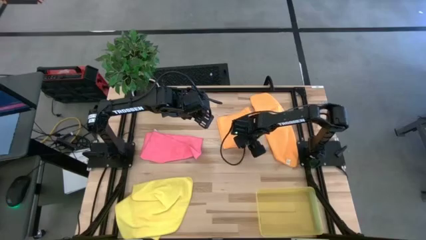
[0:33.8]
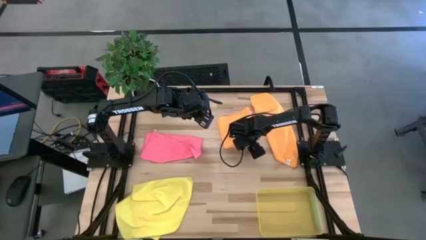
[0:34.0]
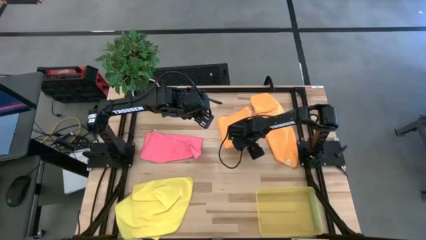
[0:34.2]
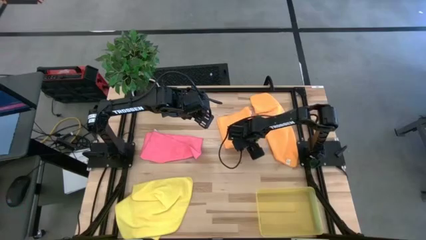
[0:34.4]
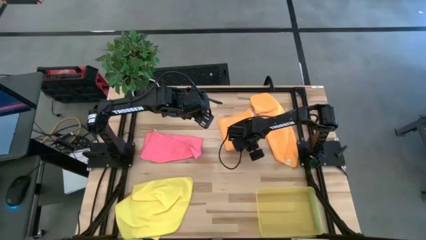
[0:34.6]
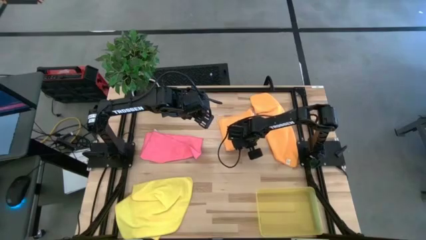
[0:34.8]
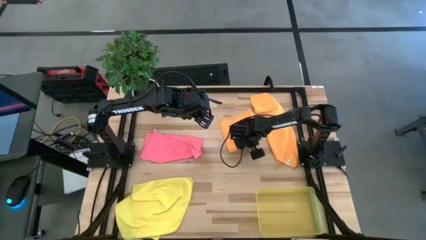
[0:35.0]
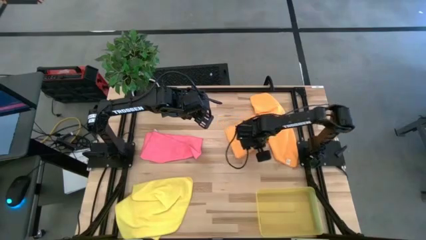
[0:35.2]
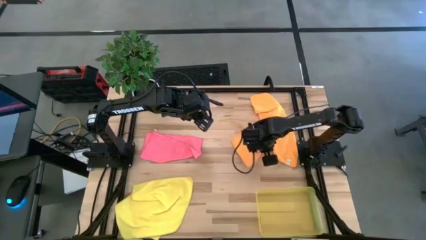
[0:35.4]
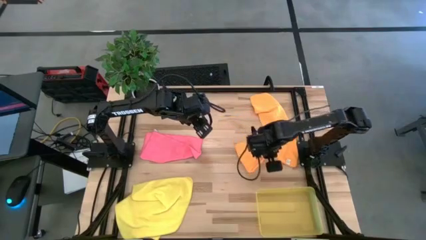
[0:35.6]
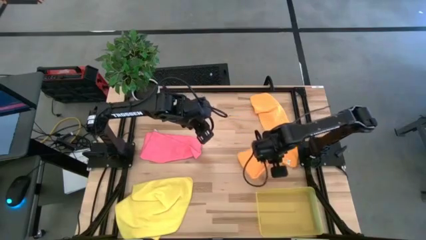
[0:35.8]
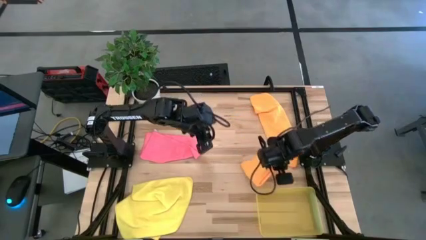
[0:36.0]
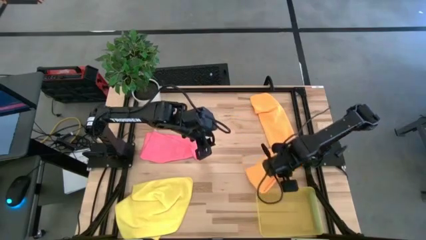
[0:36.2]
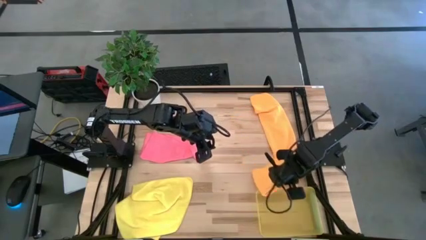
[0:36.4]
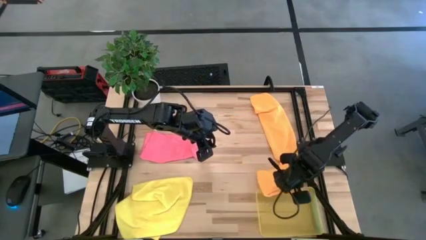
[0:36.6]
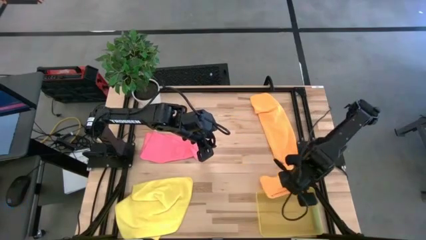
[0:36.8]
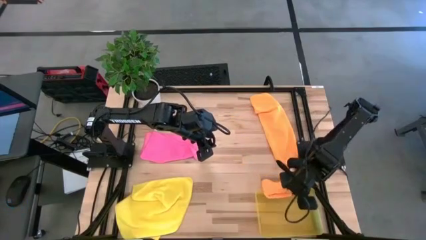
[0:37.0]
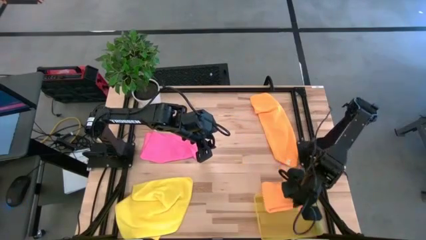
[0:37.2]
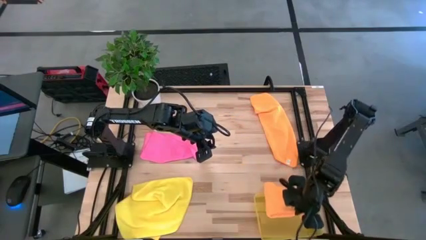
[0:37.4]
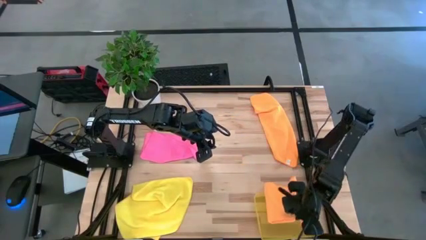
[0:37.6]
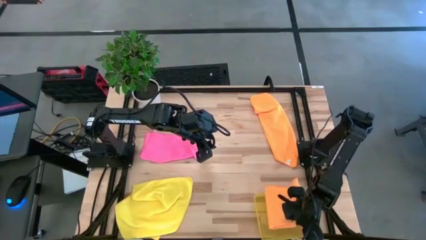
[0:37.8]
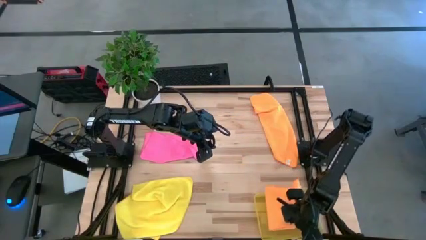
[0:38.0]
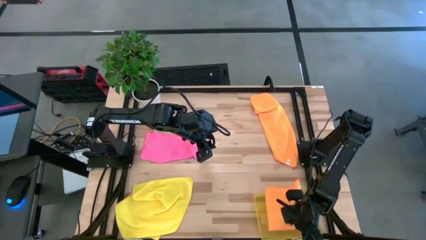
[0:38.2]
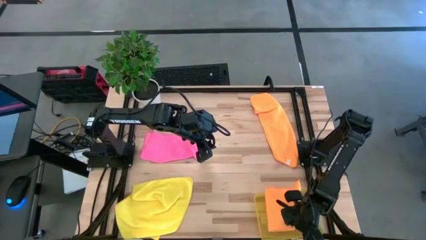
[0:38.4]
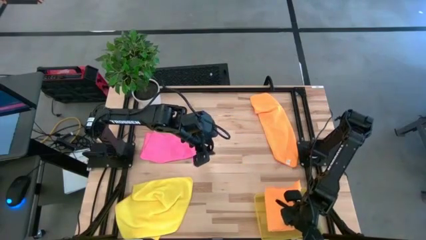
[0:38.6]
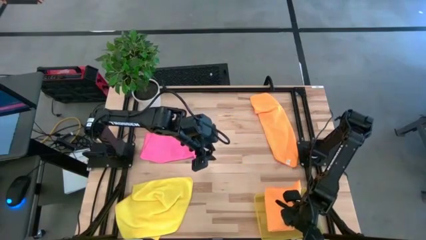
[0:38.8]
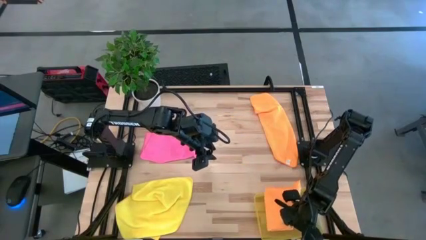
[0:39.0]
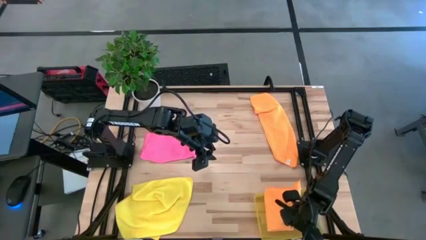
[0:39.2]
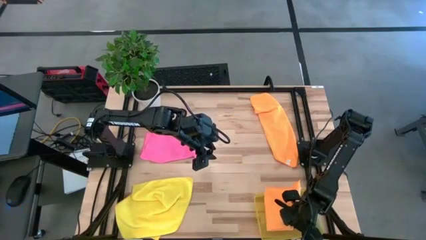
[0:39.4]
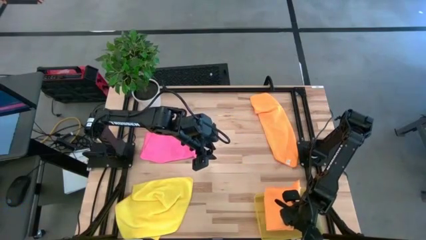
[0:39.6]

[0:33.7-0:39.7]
Task: Fold microfiber towels
Put the left orange microfiber cloth into the bin

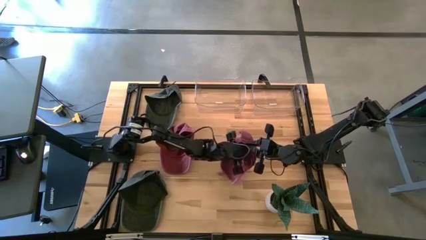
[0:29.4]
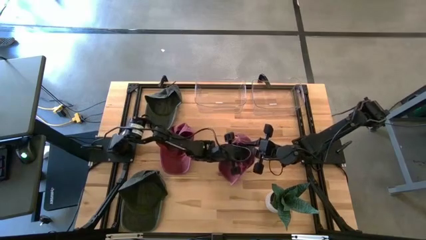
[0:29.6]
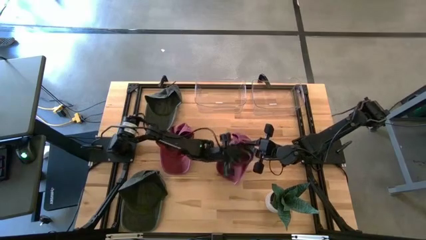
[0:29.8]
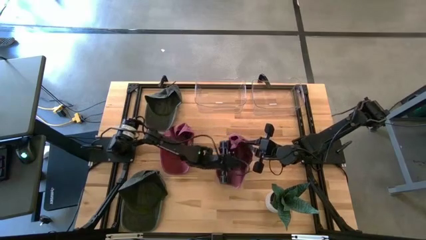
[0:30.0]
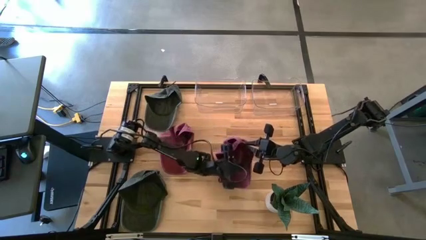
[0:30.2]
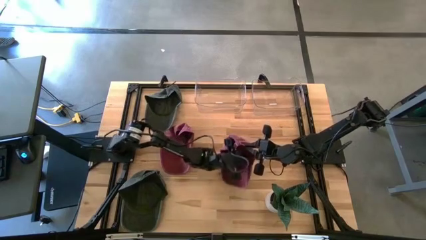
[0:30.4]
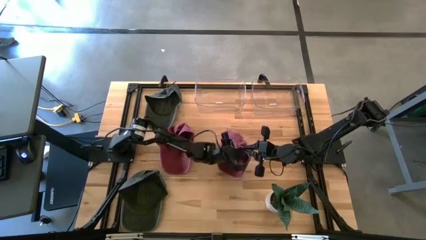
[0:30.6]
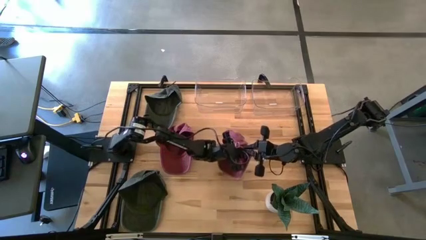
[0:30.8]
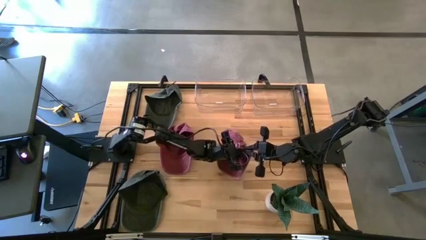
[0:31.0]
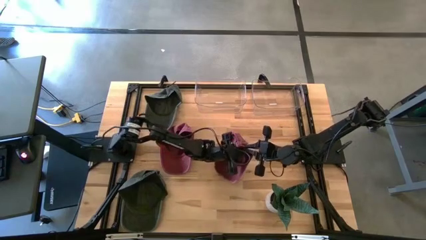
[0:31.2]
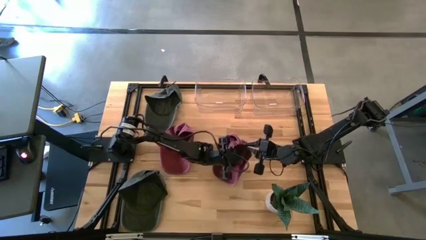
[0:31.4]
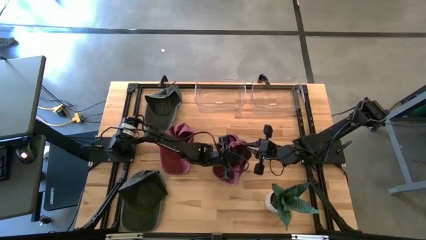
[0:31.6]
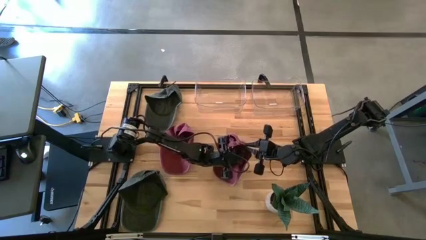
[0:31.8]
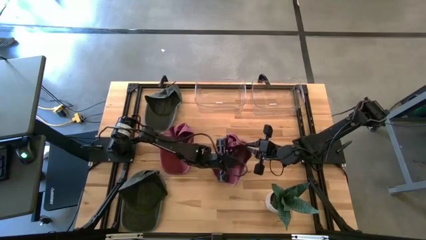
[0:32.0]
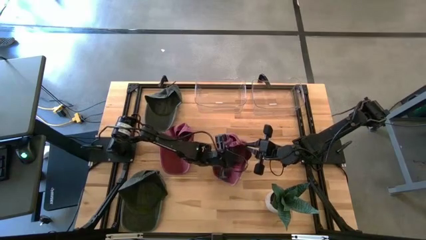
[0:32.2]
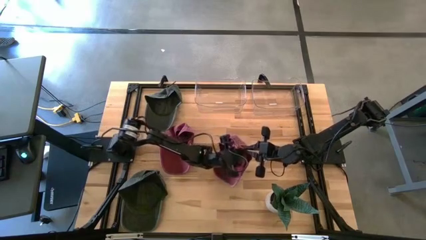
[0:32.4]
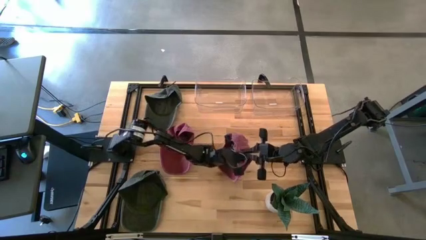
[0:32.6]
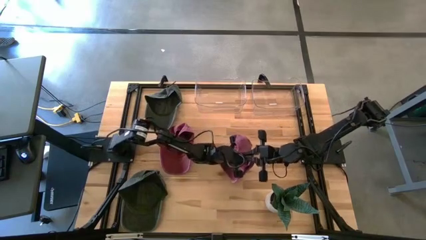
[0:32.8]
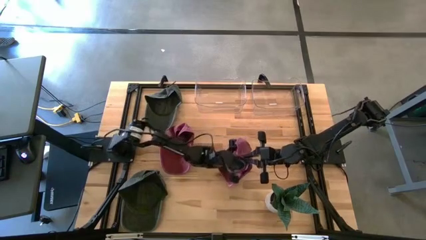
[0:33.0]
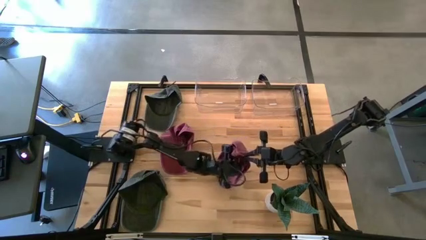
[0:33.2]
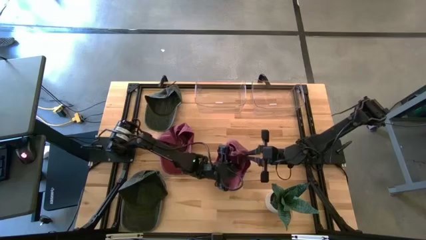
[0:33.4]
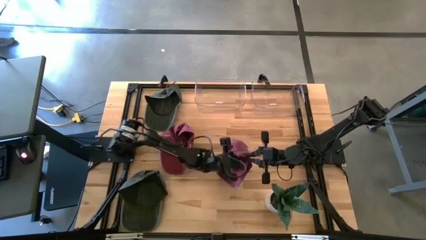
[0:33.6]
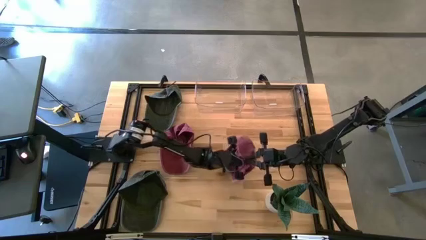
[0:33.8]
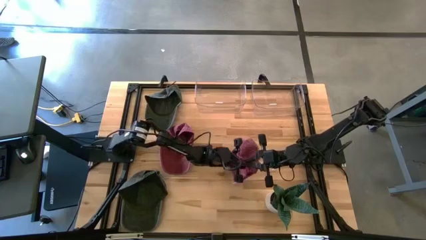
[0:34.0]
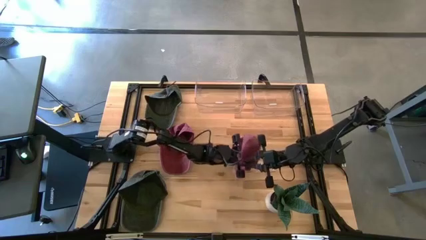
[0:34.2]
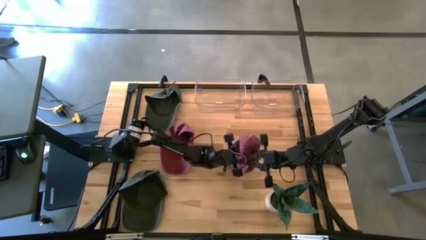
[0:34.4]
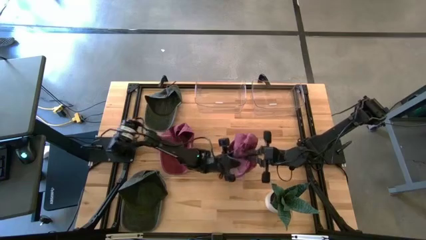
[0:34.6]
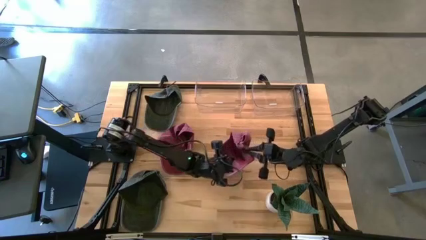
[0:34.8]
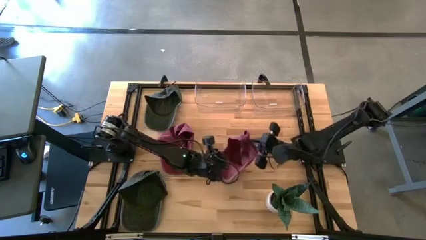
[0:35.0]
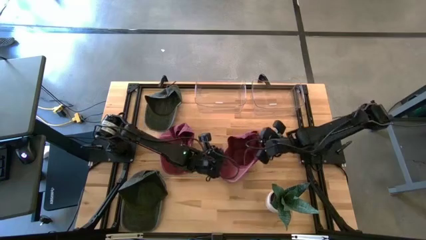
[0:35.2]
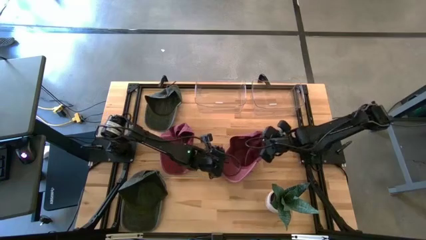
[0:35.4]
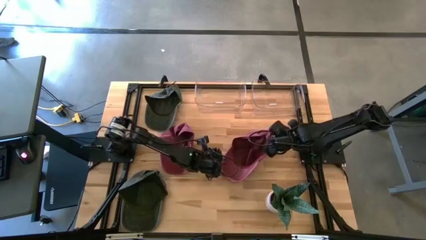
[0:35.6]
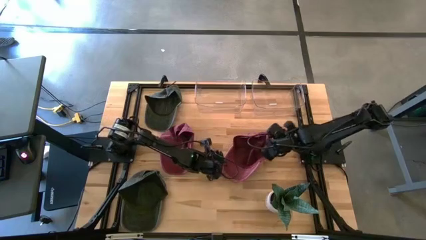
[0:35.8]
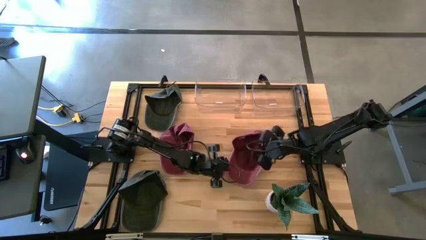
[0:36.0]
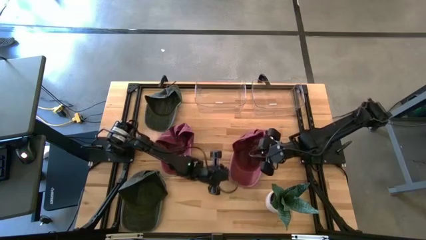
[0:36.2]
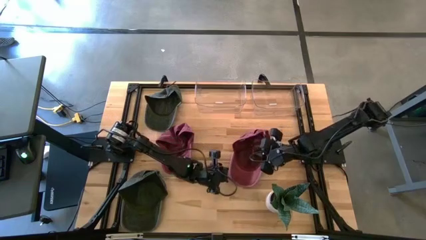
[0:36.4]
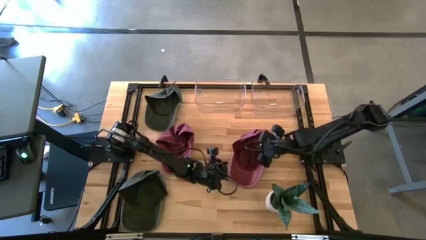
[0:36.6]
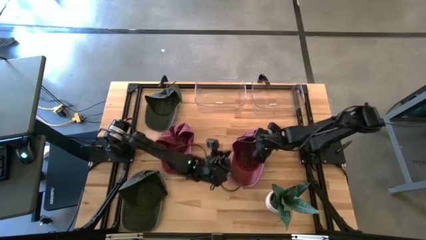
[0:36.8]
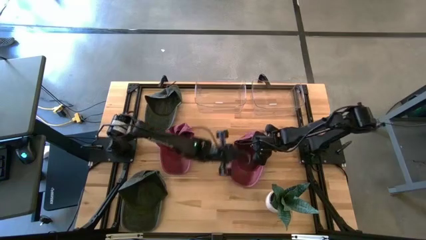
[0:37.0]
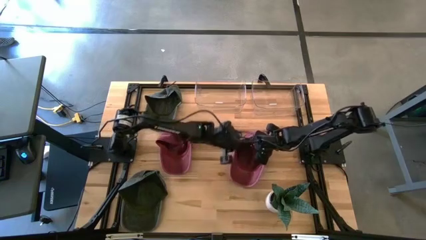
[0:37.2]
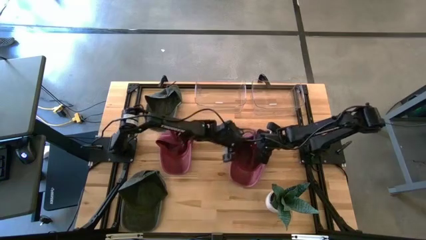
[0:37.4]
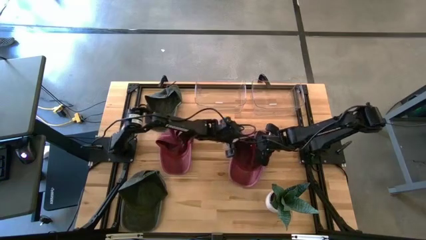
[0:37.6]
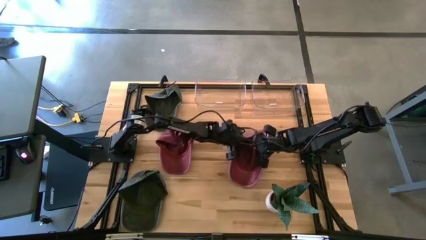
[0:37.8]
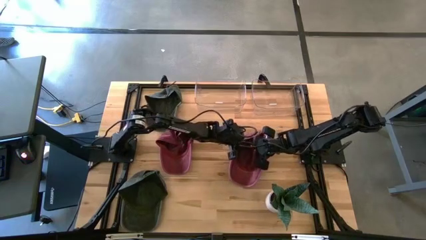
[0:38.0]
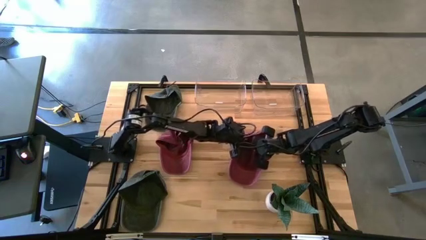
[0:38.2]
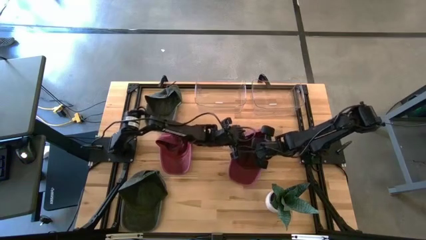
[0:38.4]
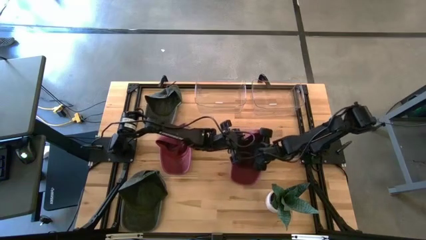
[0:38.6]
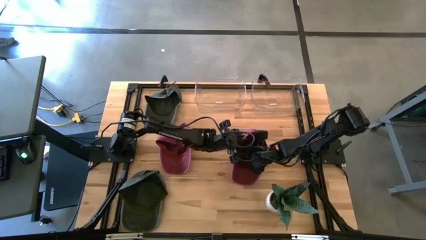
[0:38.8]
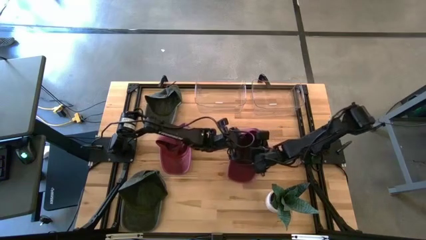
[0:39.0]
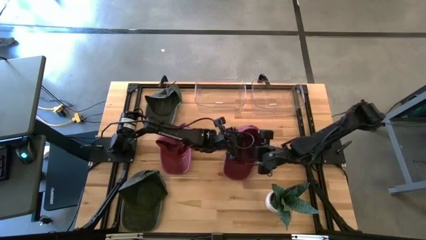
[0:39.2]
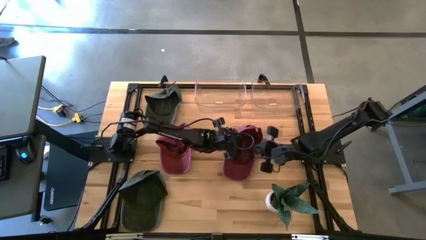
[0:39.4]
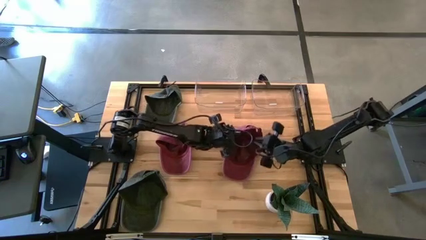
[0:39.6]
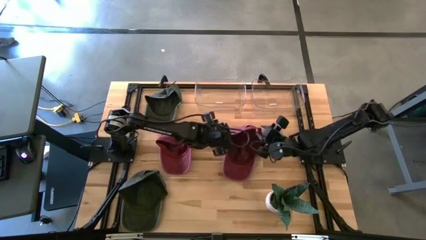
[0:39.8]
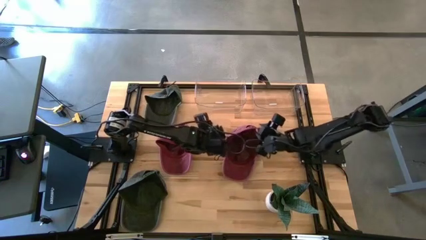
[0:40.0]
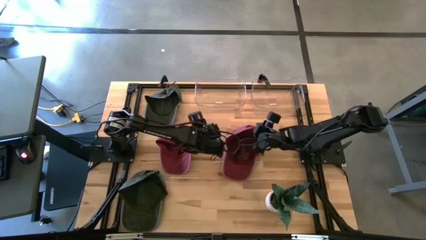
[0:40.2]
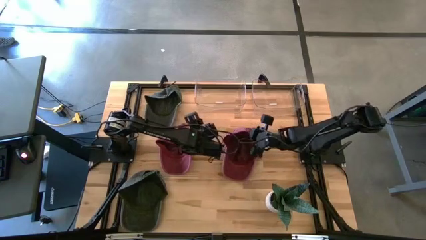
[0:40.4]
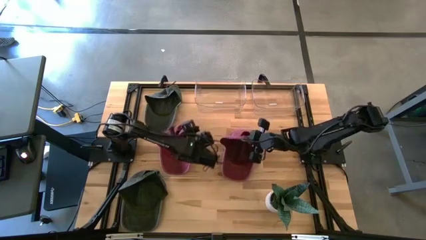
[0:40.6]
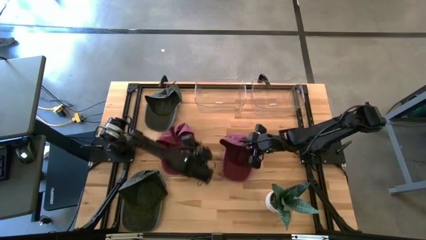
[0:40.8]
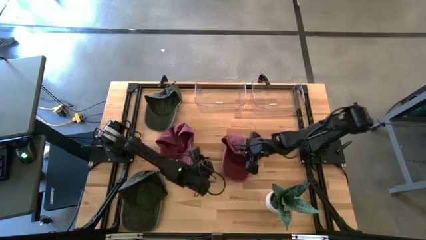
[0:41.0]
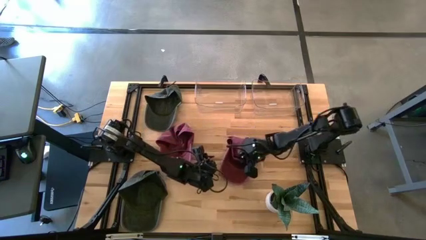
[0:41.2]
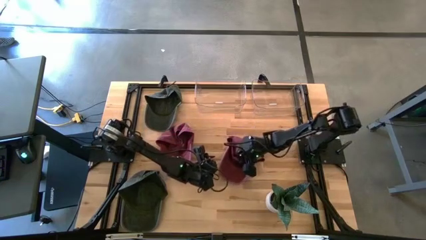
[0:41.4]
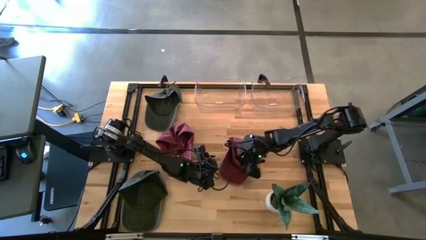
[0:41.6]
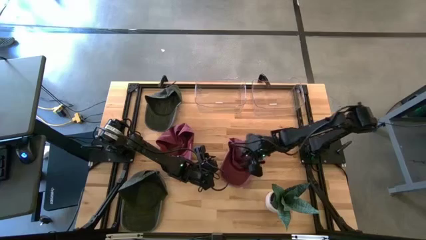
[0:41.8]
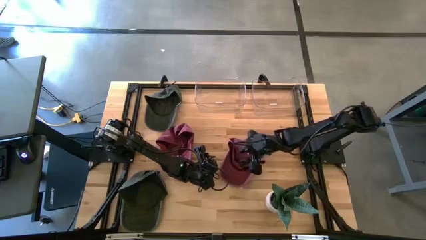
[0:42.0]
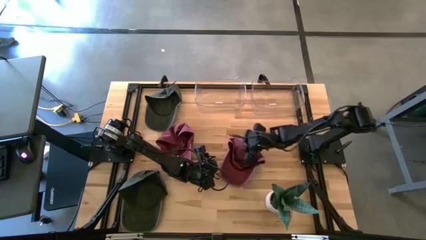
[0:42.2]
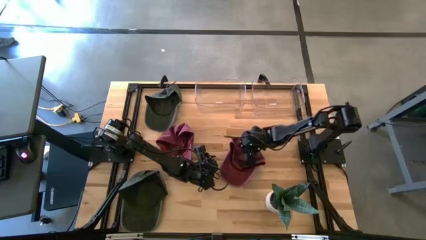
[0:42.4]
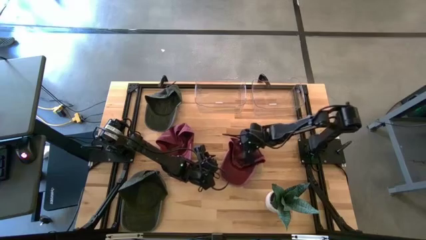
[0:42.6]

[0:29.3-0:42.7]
Task: Pick & Place hat
Put the right red cap into the left transparent bin
